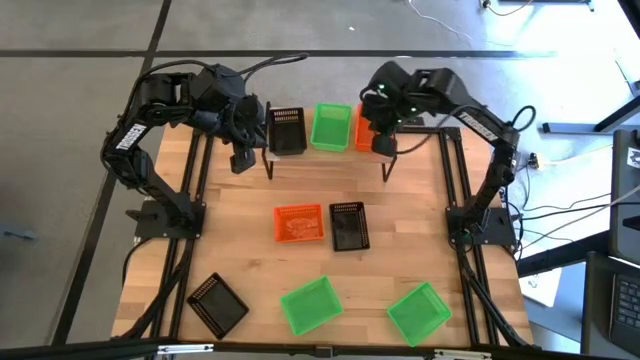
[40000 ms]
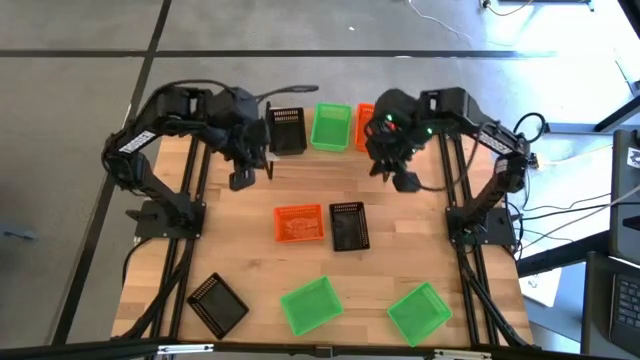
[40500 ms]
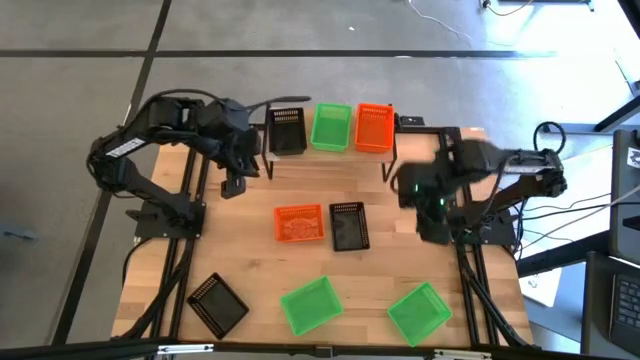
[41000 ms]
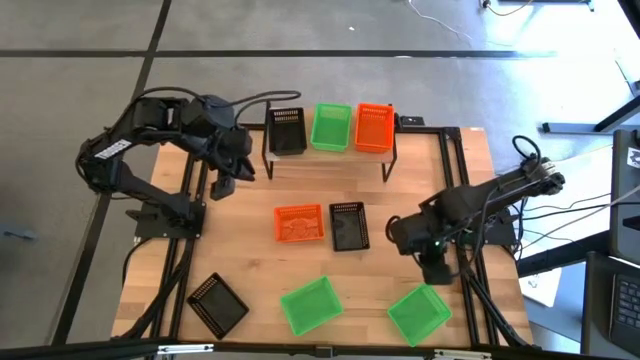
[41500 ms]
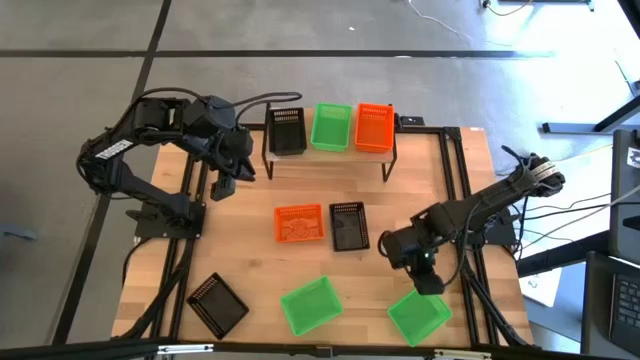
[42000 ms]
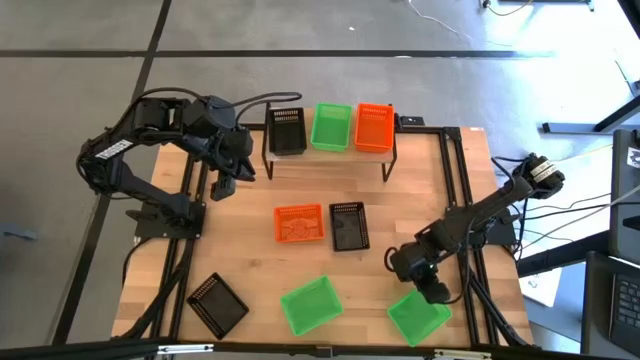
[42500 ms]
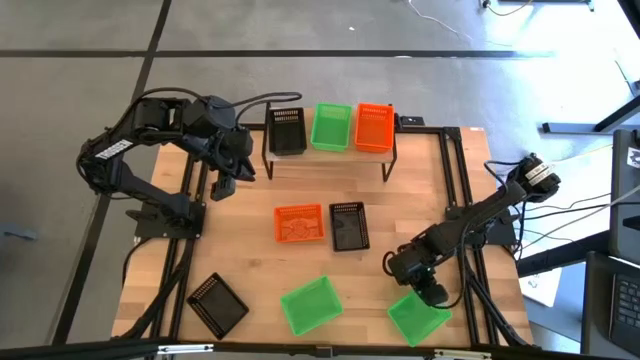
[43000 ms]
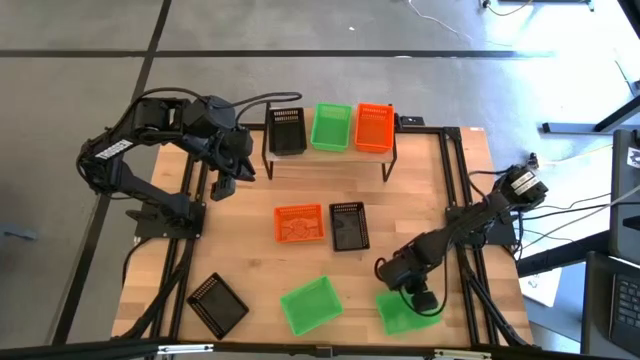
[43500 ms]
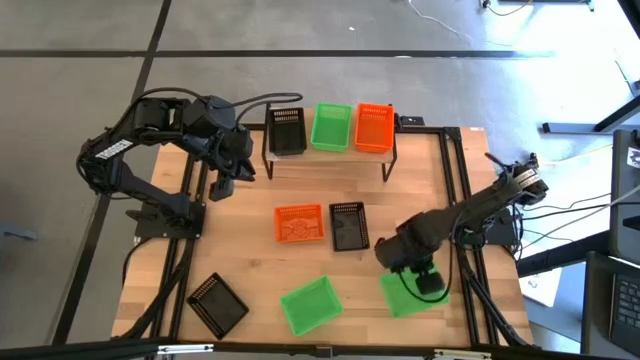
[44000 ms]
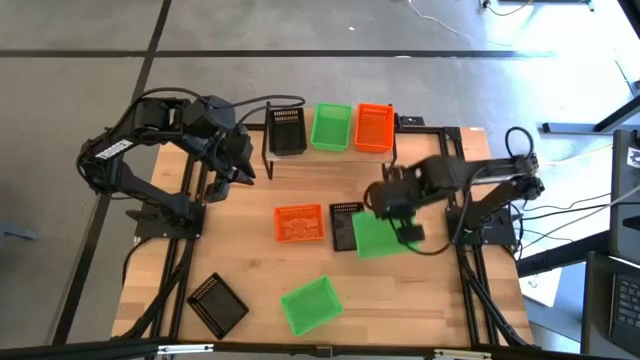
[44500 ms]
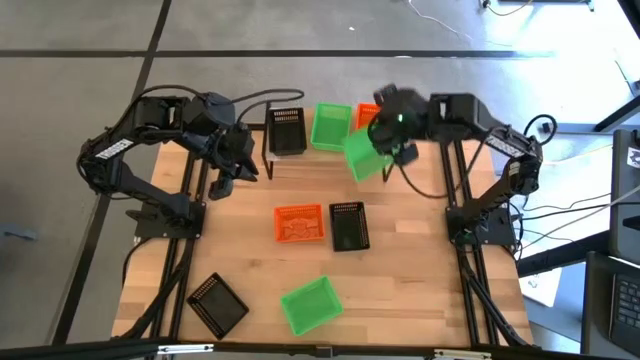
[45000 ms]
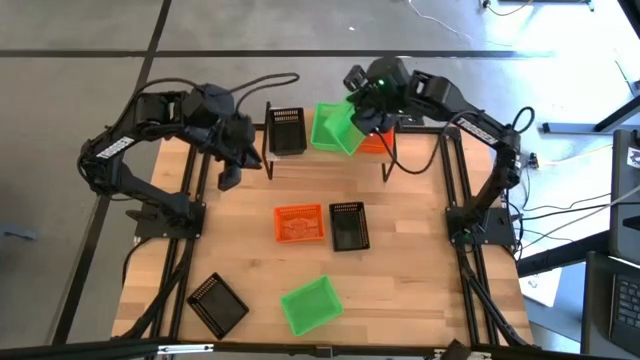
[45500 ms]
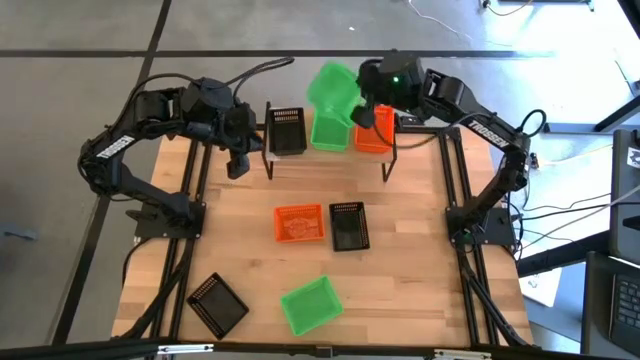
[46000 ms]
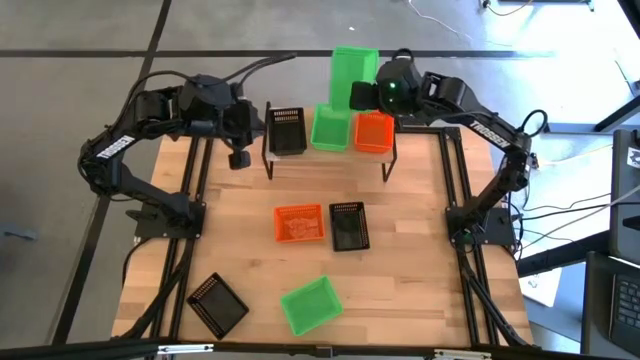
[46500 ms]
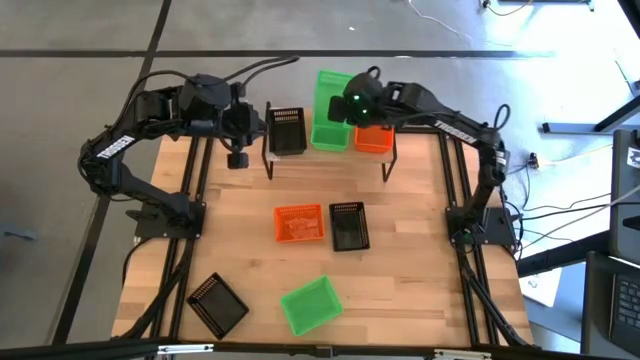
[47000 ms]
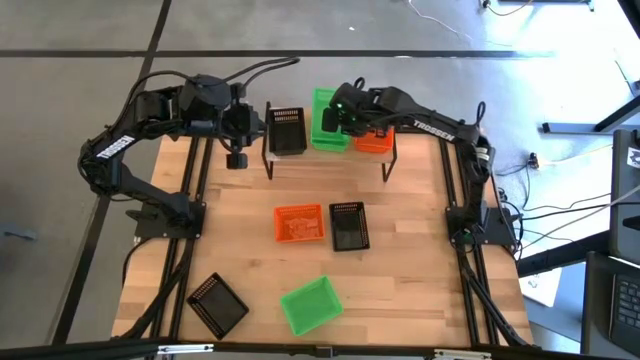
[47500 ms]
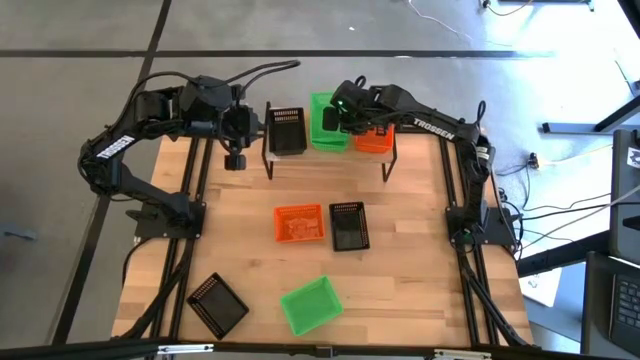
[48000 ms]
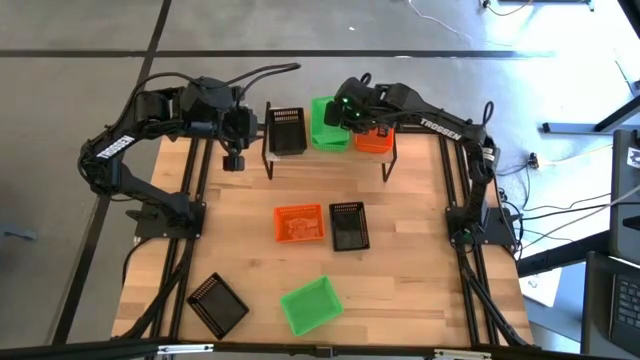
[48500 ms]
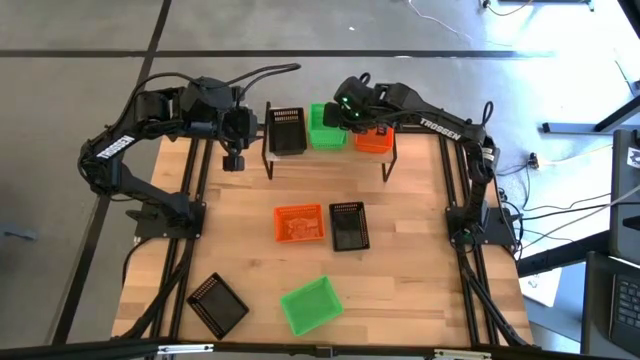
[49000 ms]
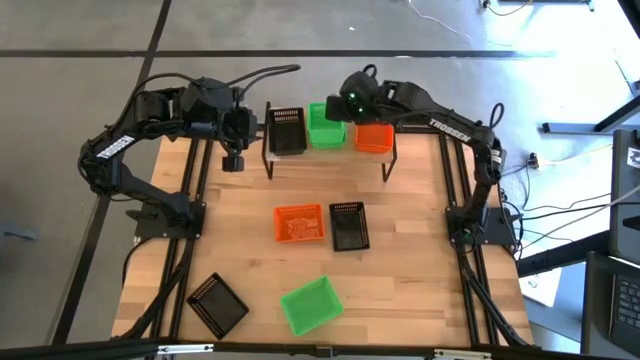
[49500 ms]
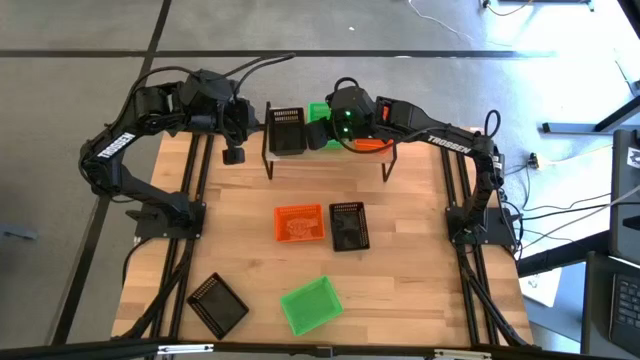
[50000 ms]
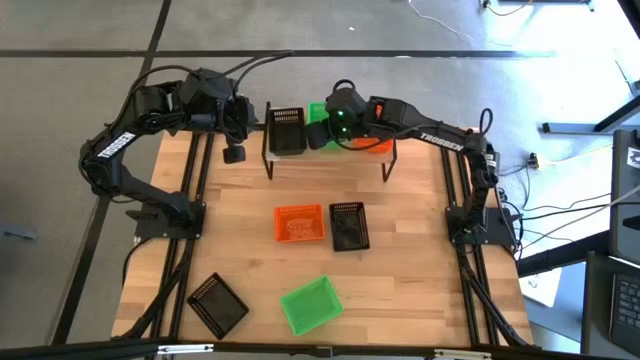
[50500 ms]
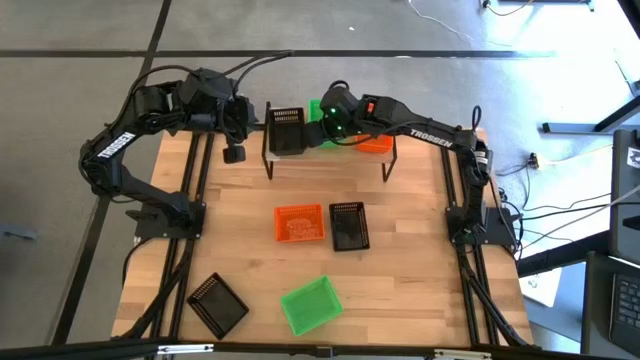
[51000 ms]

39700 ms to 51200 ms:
Task: Stack baskets on shelf by color
Stack the right green bin on top of the other green bin on the shelf

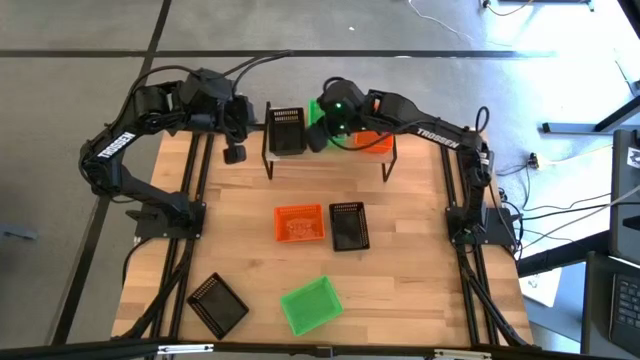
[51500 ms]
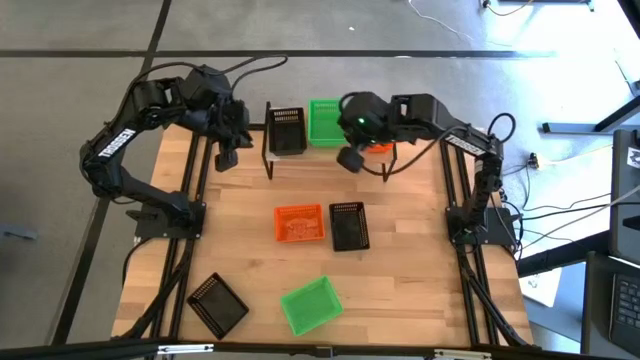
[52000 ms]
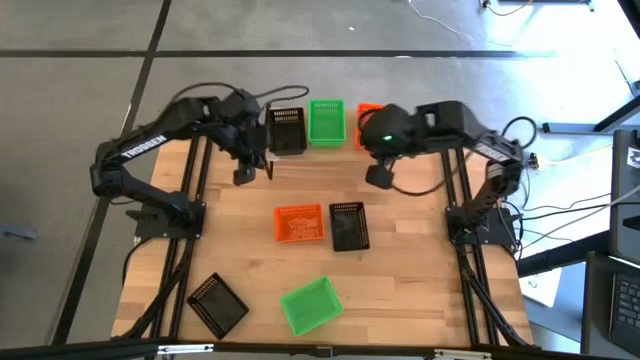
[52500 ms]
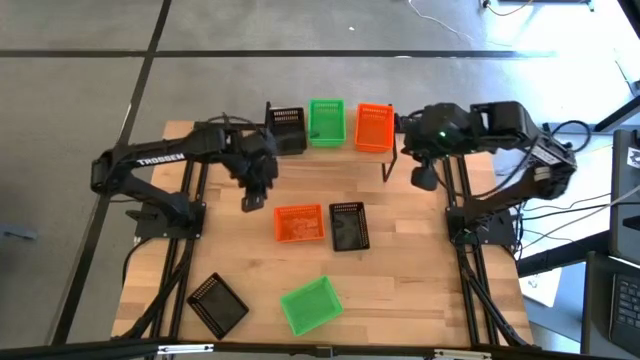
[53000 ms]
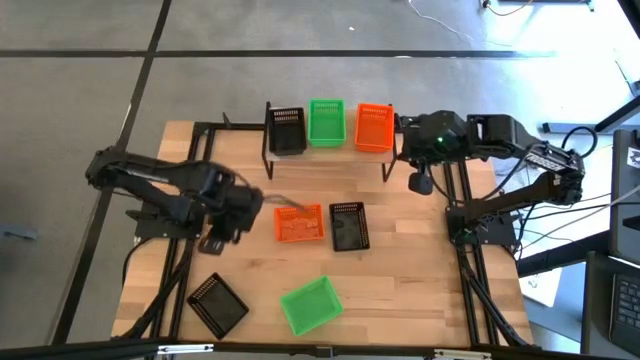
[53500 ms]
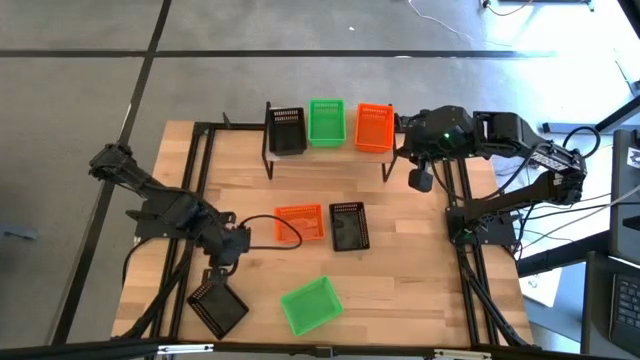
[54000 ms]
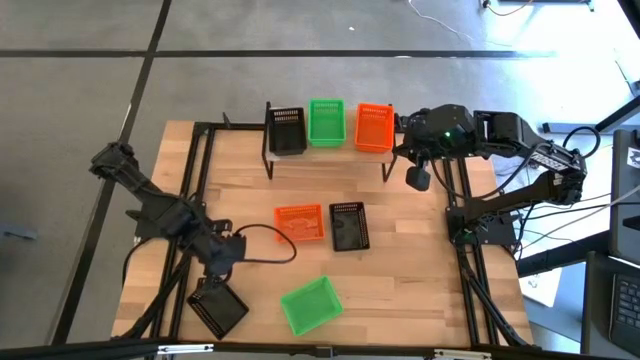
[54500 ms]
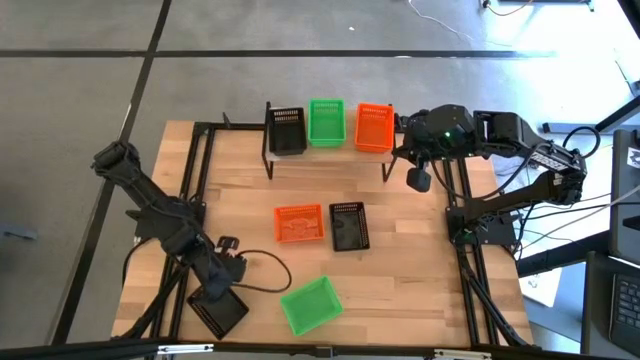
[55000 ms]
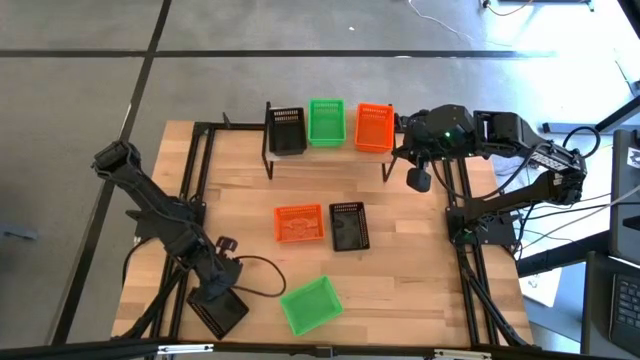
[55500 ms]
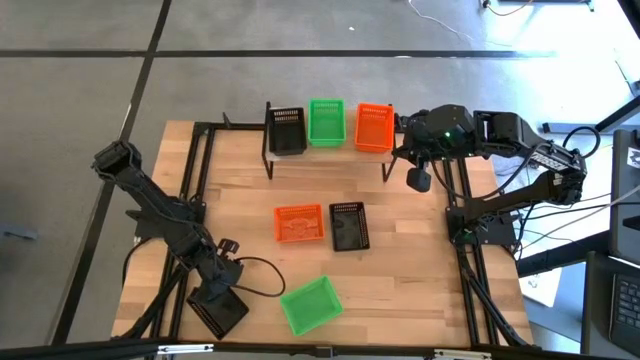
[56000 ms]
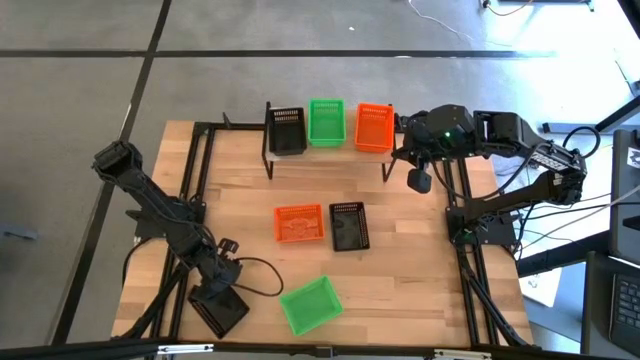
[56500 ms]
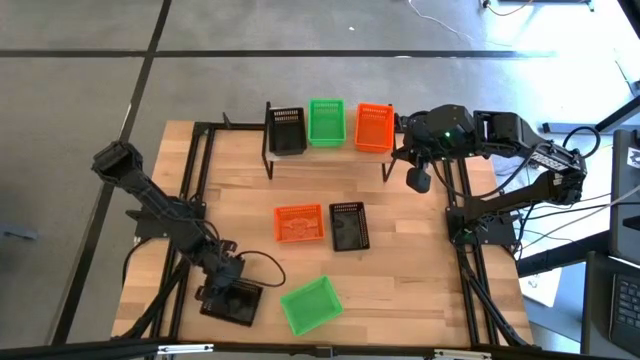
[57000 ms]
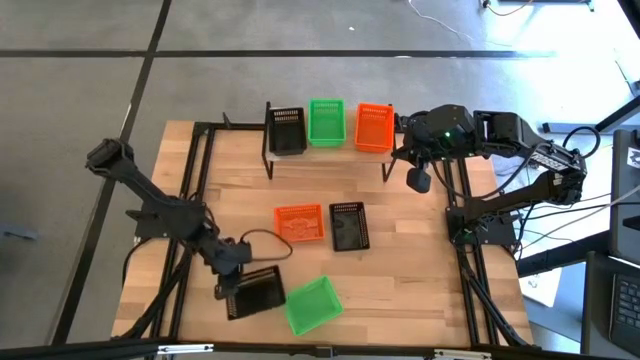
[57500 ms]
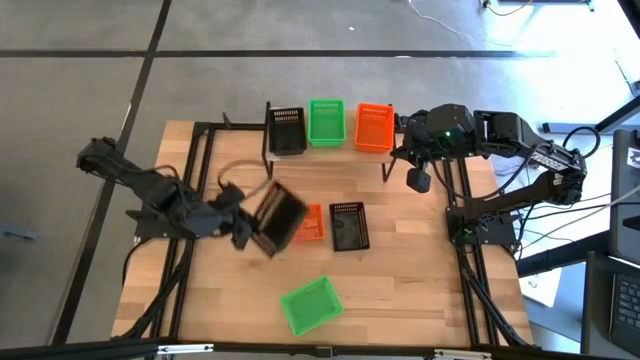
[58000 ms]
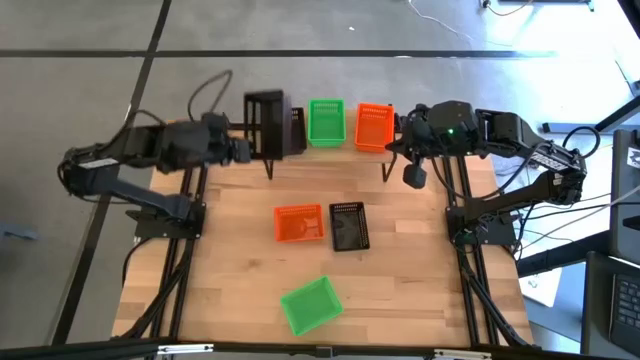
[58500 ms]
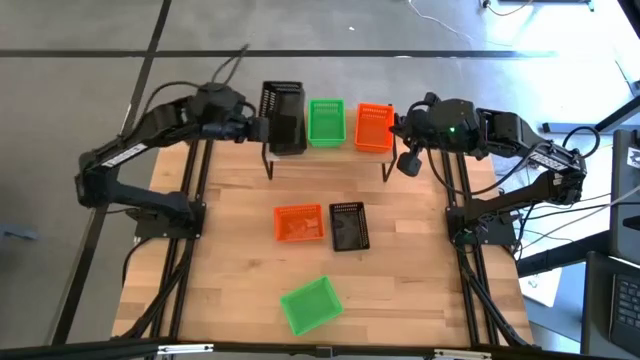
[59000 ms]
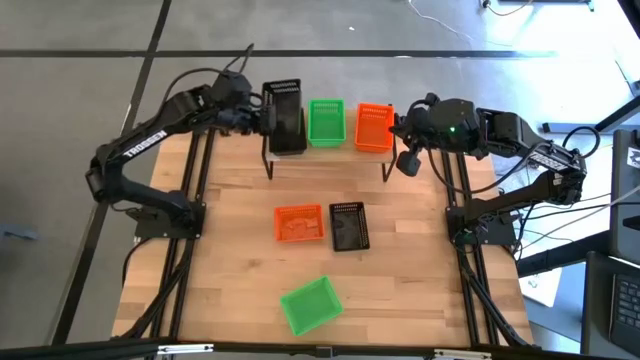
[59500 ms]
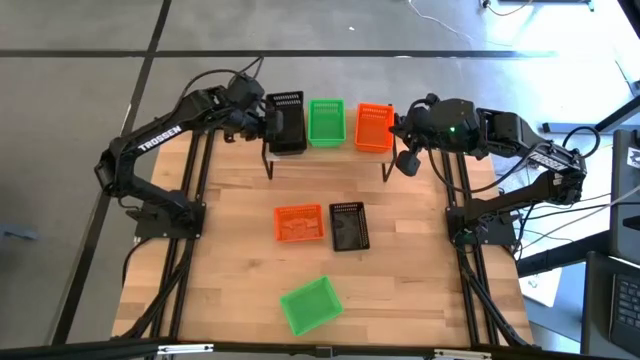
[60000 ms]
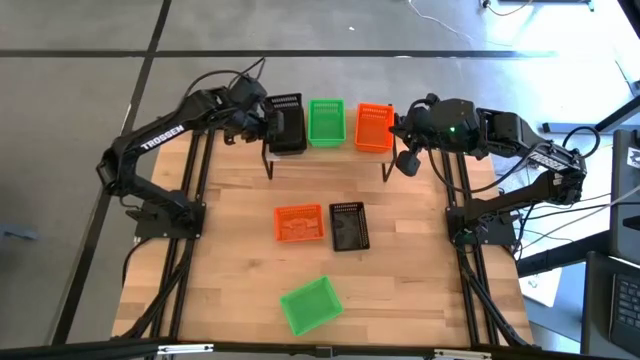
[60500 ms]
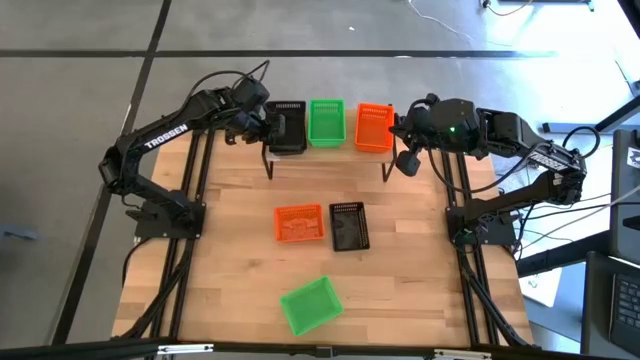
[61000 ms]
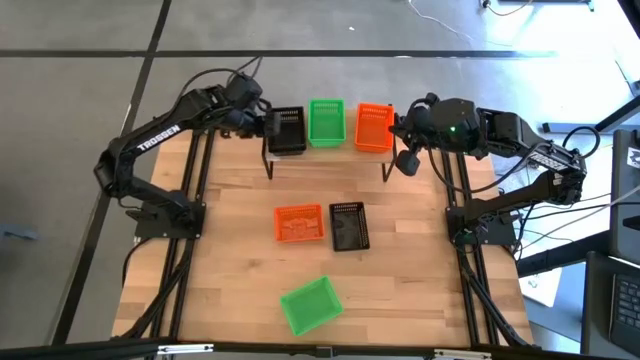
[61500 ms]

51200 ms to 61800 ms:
Stack the bottom black bin on top of the other black bin on the shelf

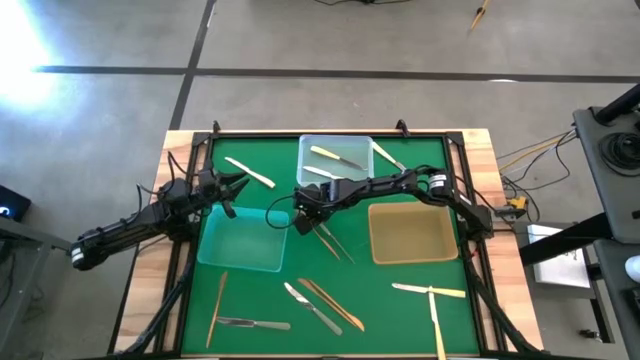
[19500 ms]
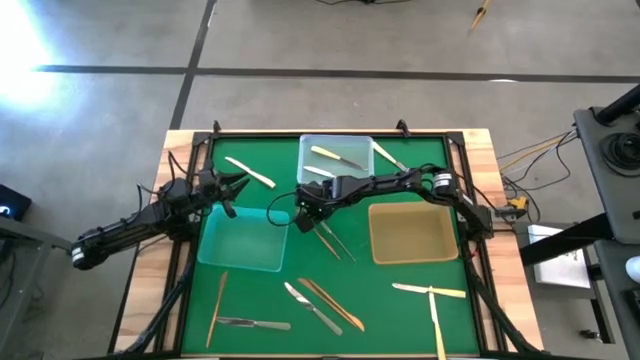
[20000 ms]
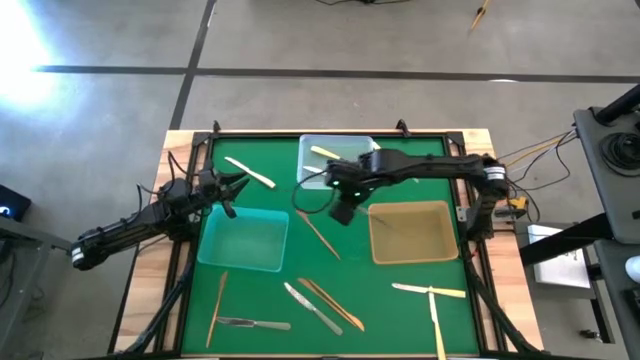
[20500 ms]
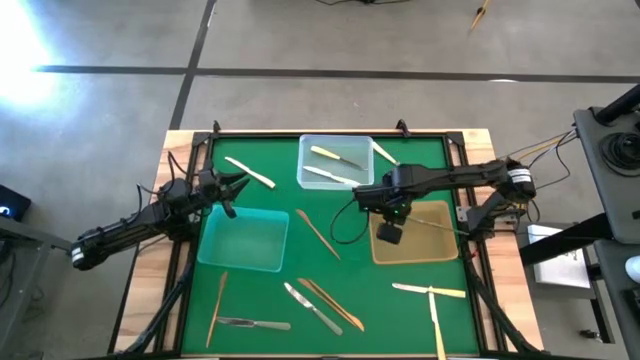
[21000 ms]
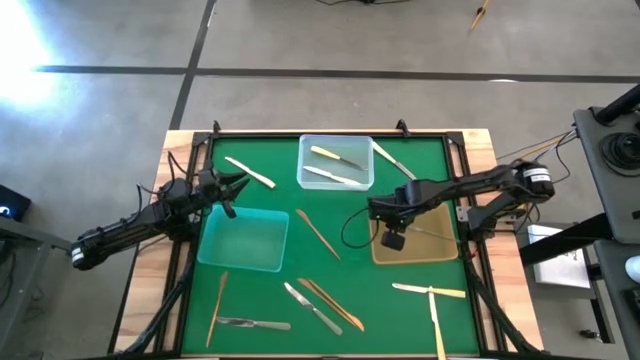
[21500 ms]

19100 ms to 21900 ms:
Task: Sort silverware by color (type)
Put the gray knife into the orange bin
